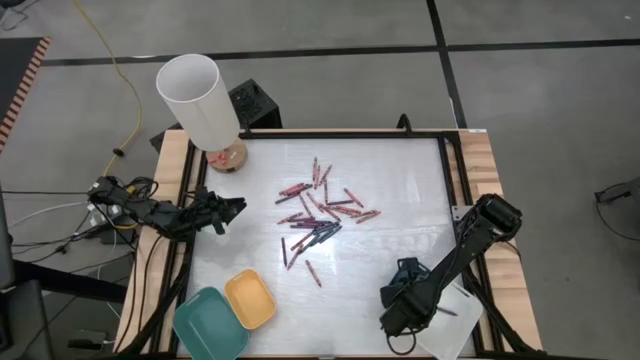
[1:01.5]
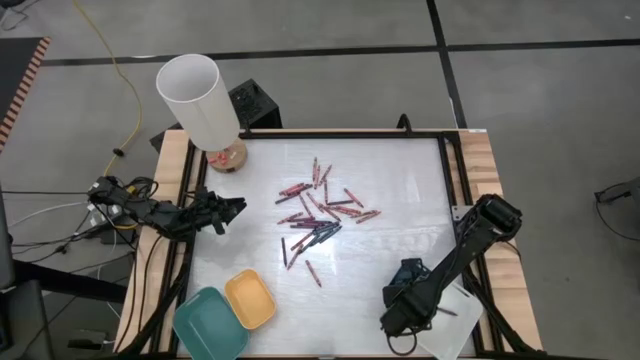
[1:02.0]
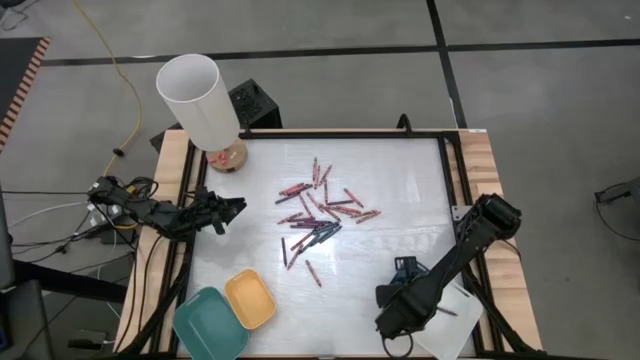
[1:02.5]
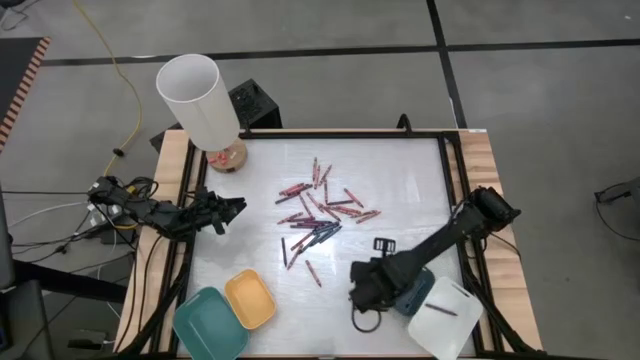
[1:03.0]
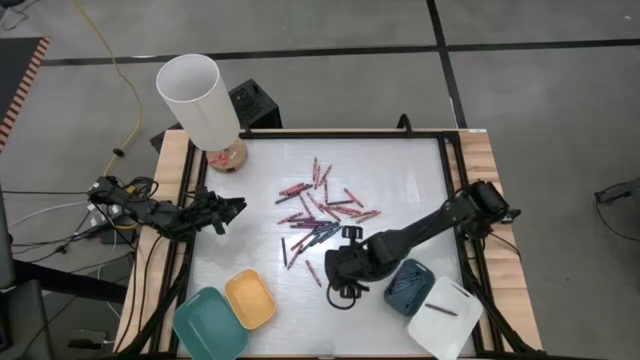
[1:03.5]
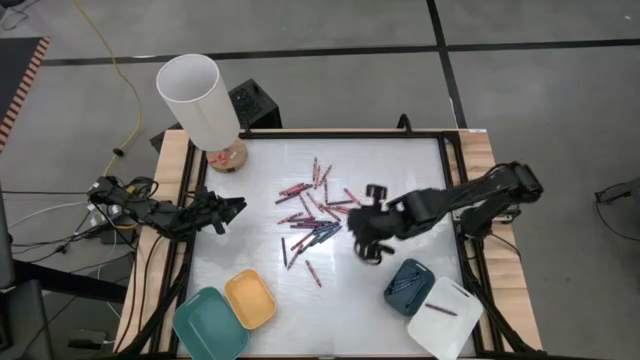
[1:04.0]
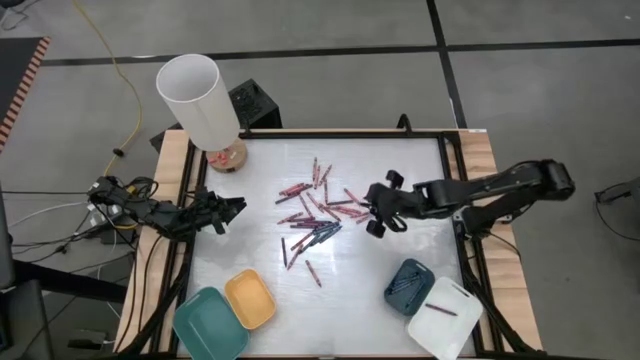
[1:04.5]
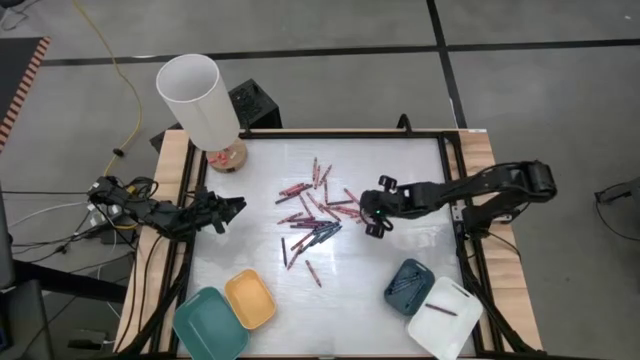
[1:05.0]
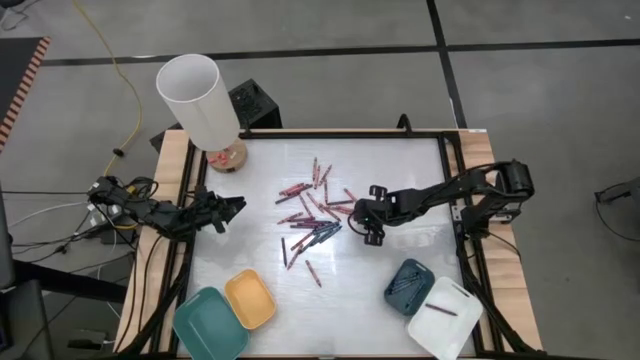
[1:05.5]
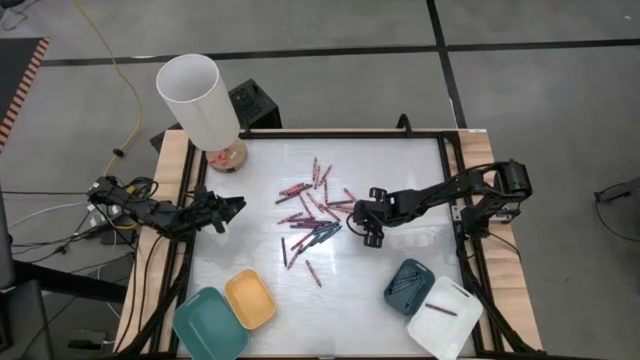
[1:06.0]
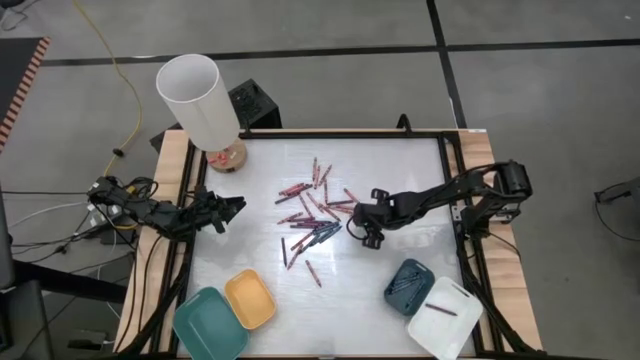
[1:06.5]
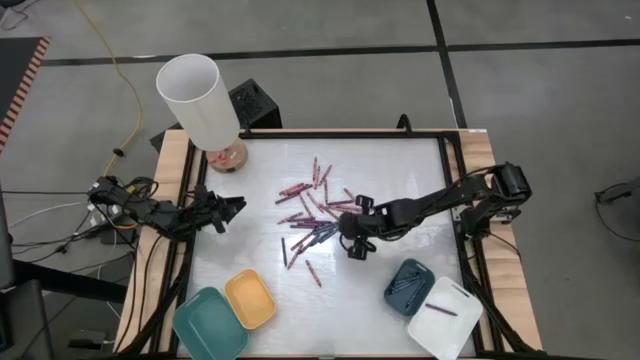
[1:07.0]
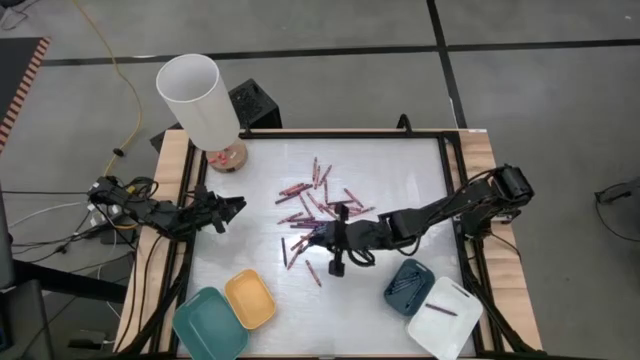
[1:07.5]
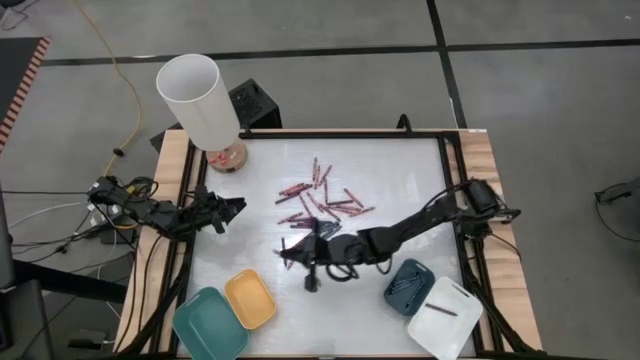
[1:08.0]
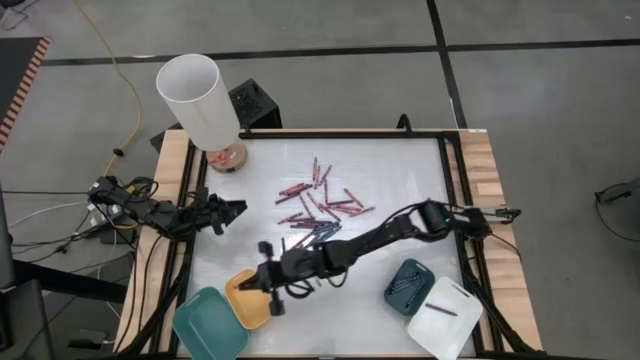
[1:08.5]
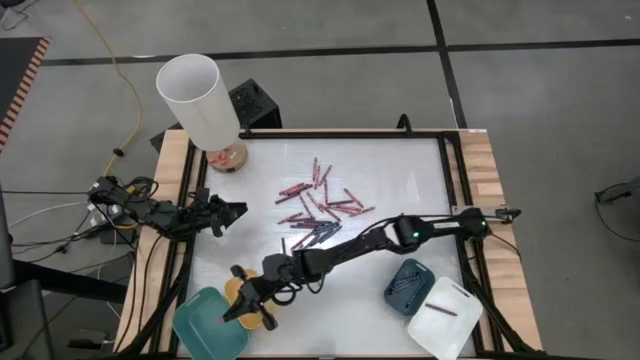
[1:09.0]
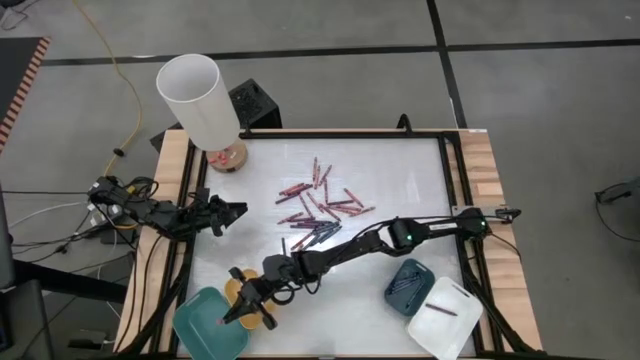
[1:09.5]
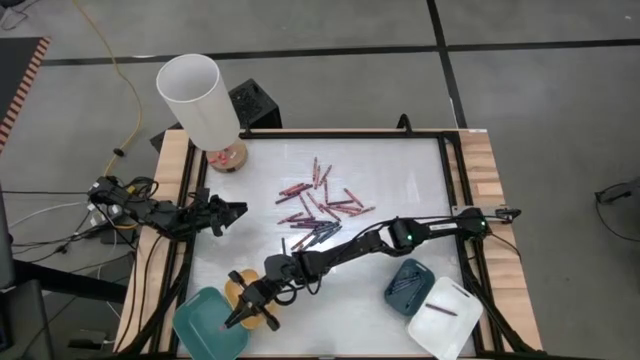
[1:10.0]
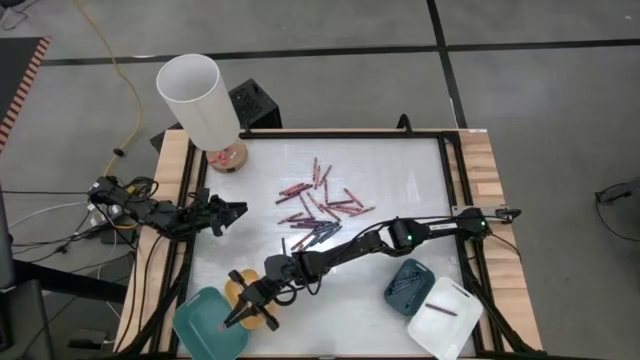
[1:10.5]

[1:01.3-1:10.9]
Task: Sort crayons
Put the pink crayon into the yellow bin

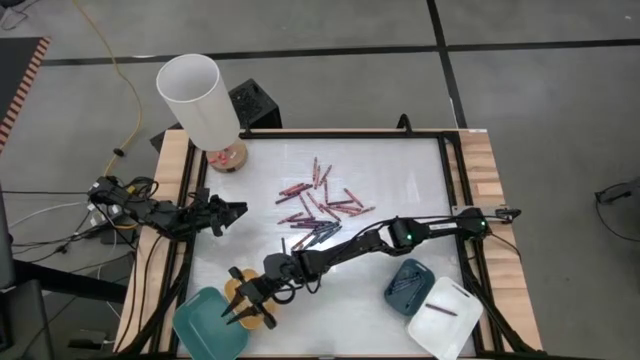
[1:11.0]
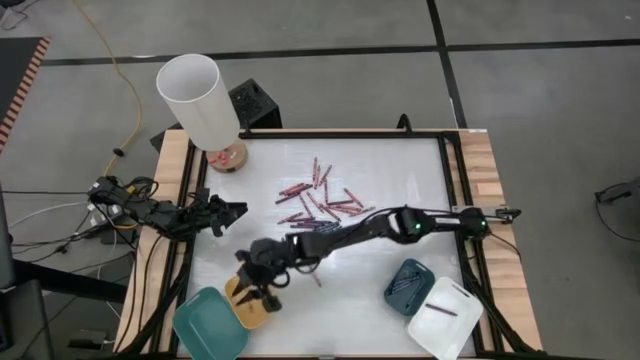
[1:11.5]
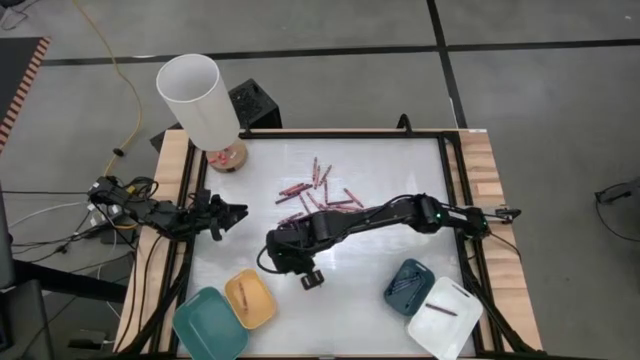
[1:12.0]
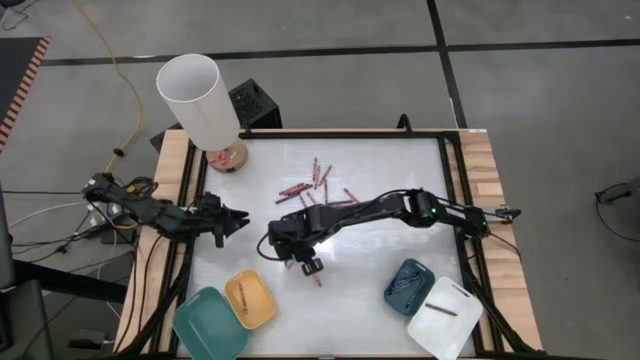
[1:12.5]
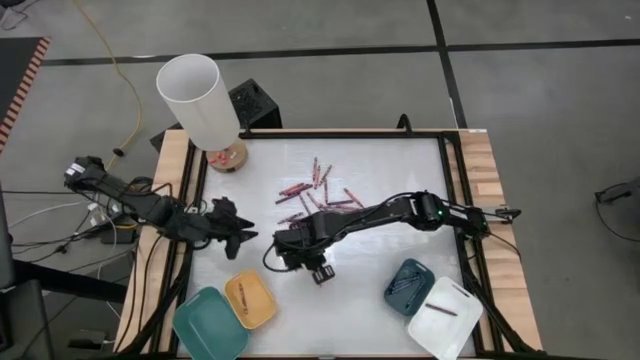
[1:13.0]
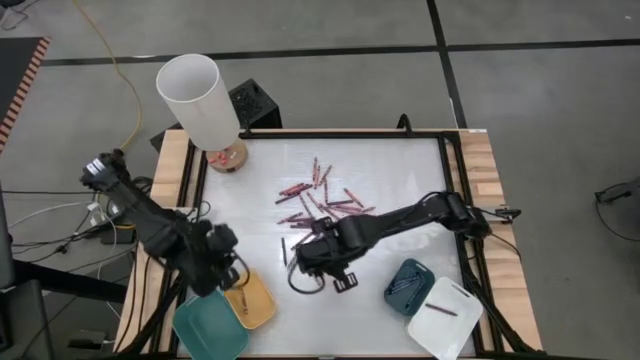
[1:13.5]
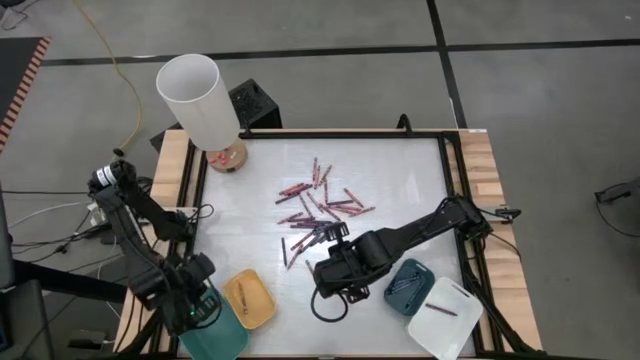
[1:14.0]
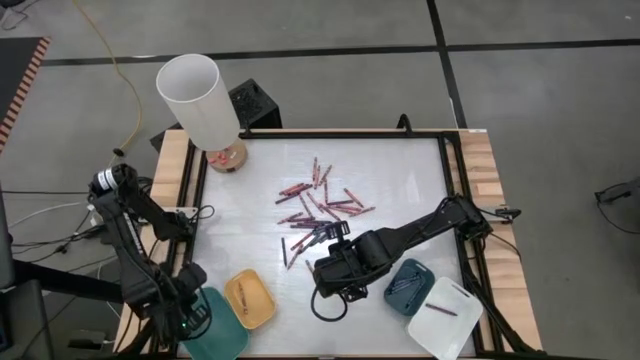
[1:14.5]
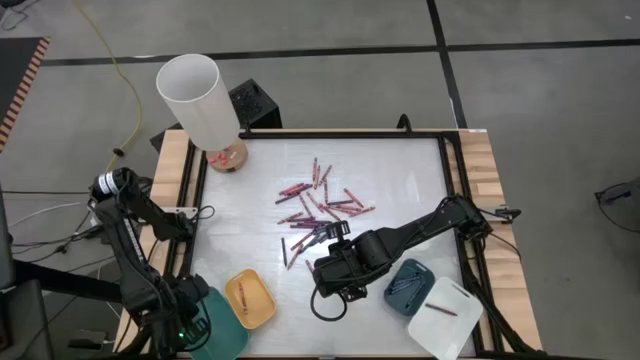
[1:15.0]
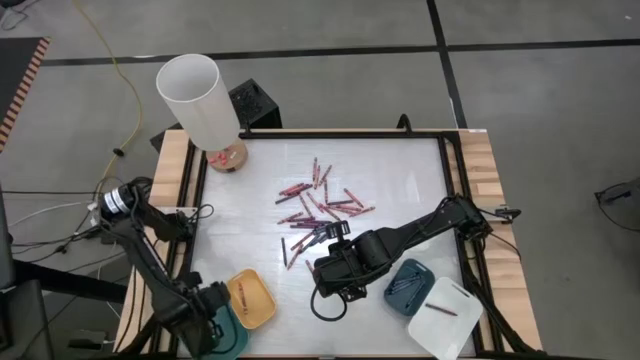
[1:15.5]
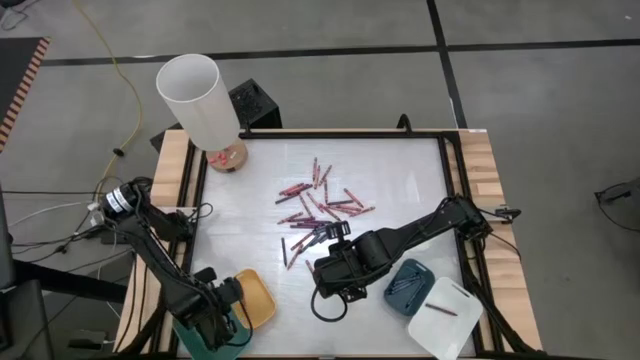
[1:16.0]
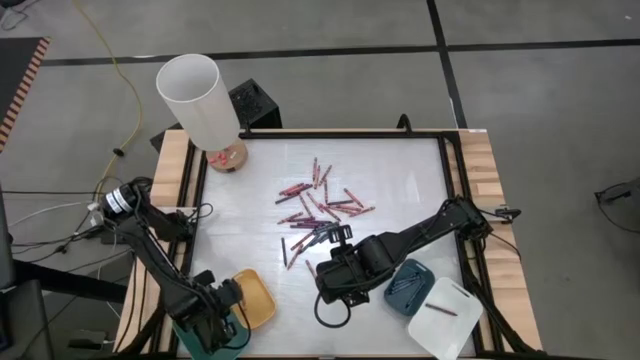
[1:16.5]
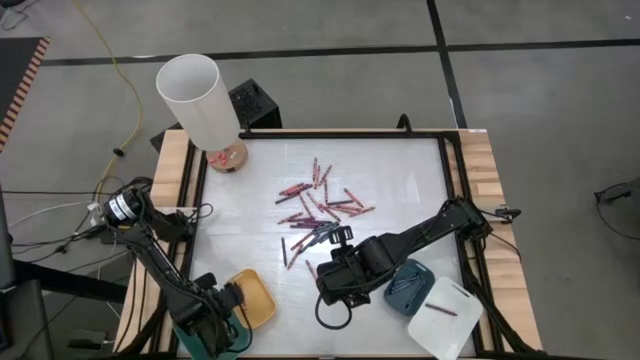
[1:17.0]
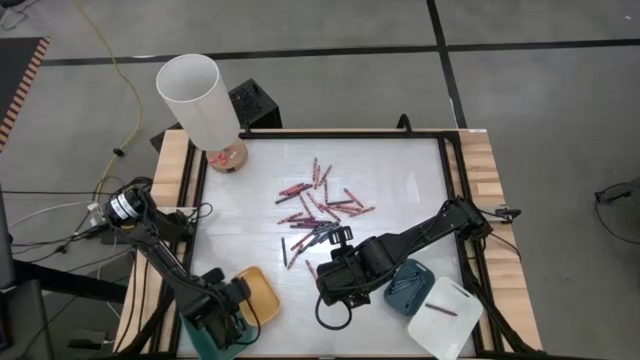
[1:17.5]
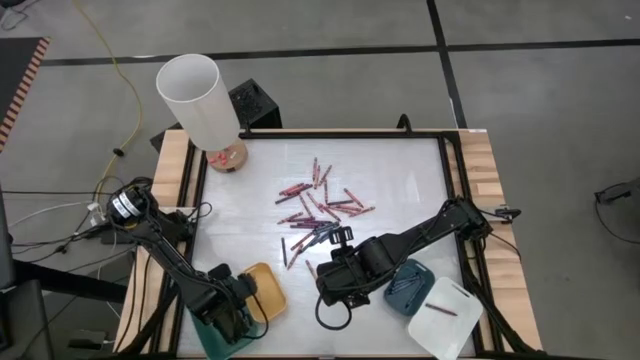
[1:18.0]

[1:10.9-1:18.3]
Adjust the blue bin

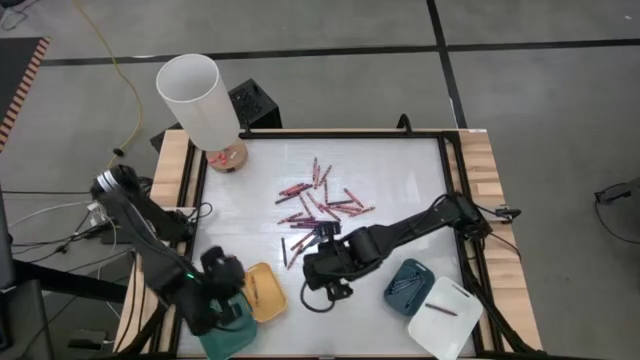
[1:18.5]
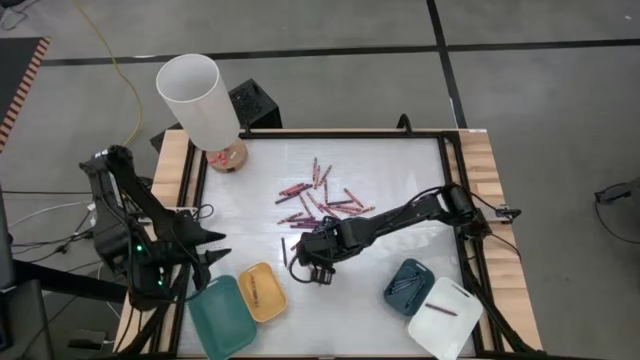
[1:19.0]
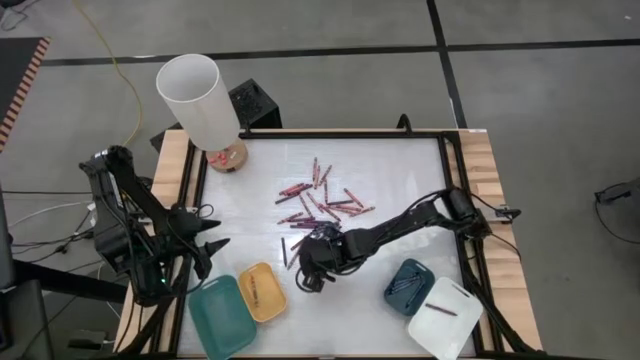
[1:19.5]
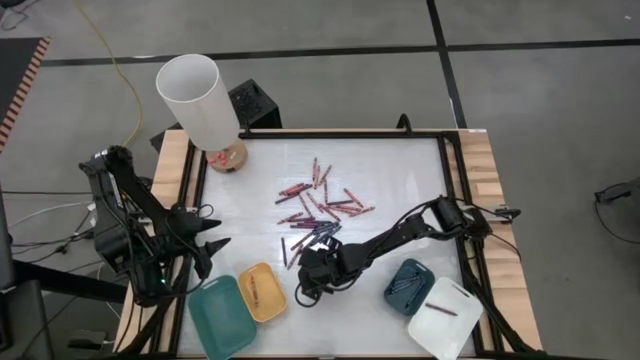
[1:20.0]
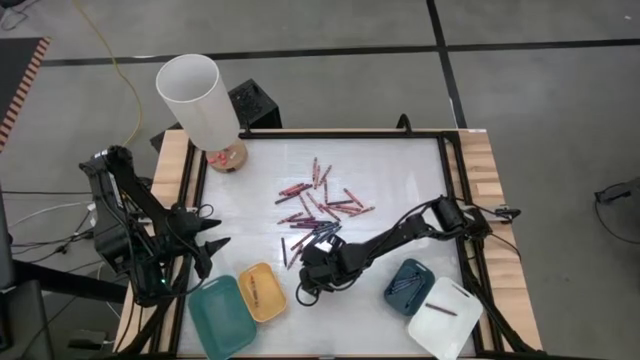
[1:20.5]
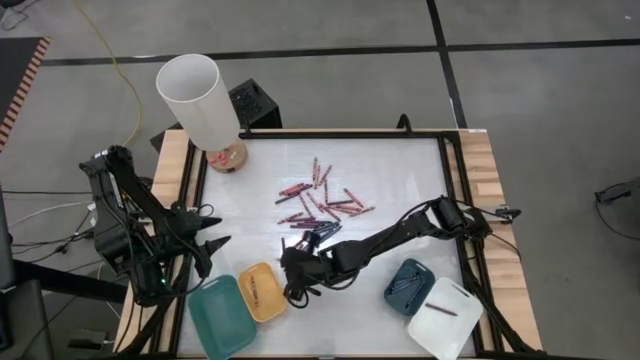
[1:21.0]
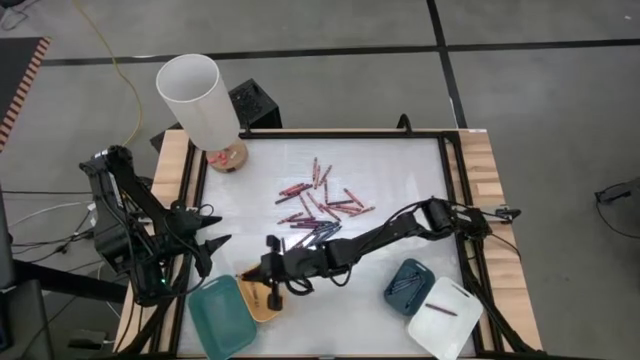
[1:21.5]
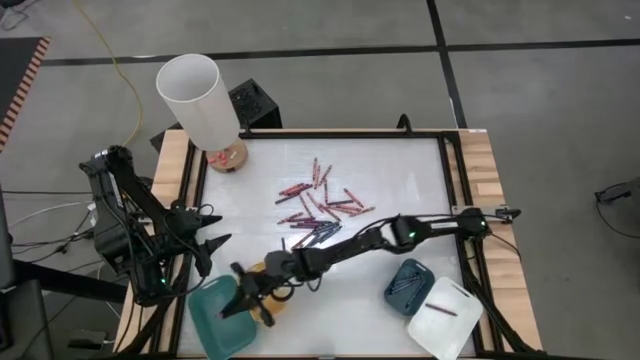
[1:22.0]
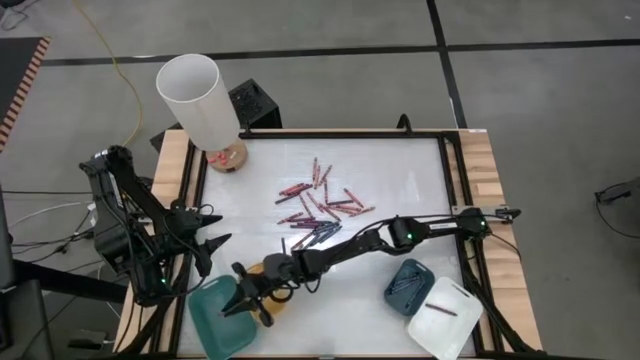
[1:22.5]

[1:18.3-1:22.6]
Put the red crayon into the blue bin
